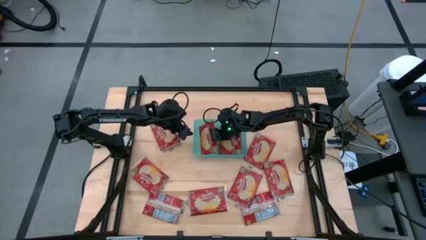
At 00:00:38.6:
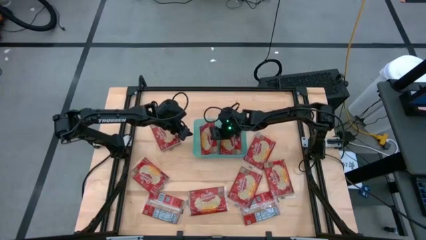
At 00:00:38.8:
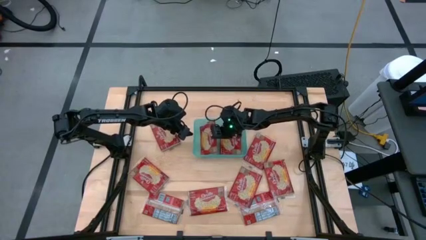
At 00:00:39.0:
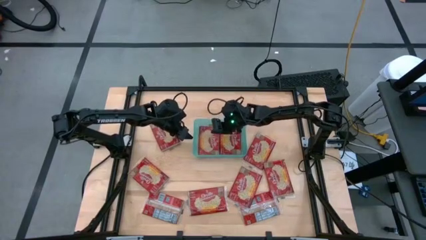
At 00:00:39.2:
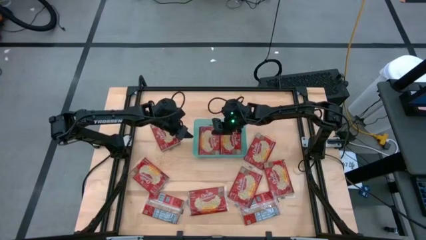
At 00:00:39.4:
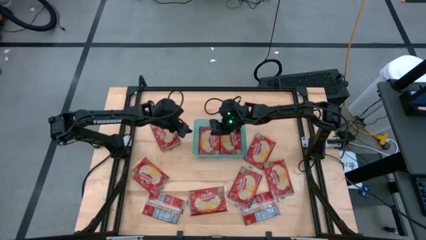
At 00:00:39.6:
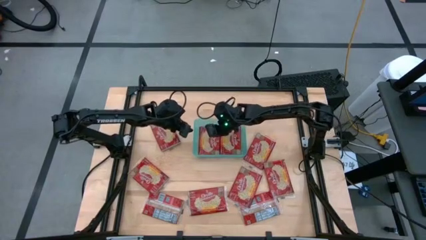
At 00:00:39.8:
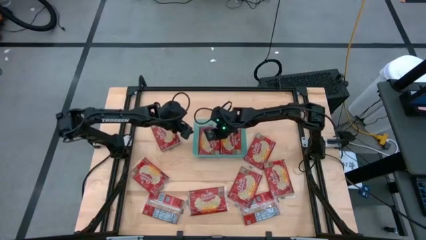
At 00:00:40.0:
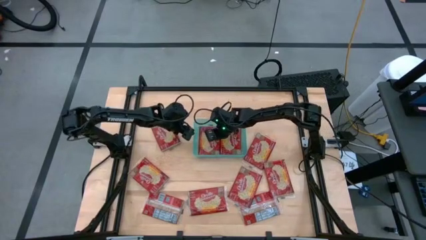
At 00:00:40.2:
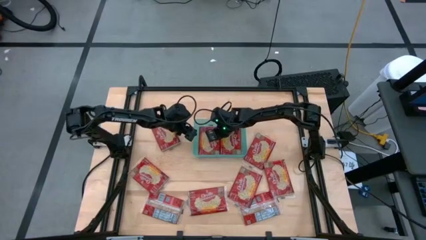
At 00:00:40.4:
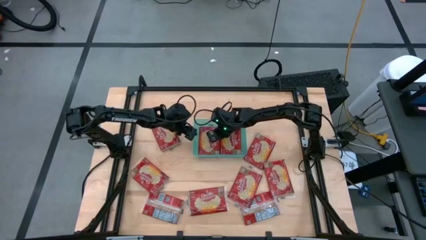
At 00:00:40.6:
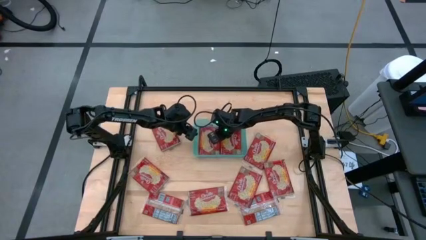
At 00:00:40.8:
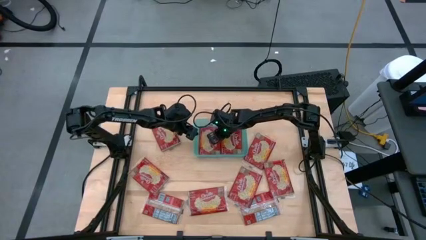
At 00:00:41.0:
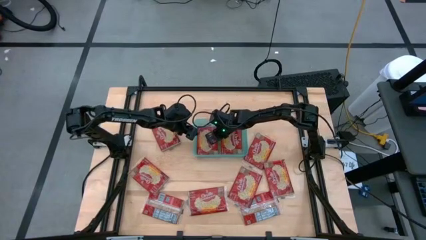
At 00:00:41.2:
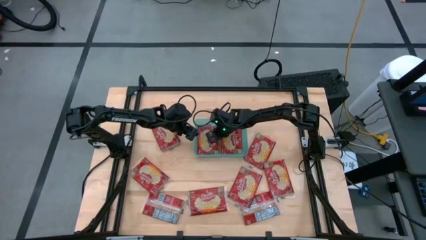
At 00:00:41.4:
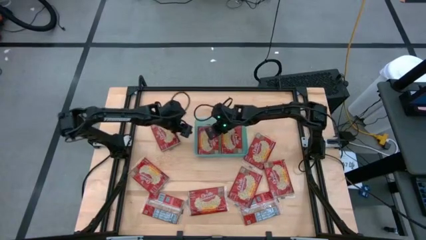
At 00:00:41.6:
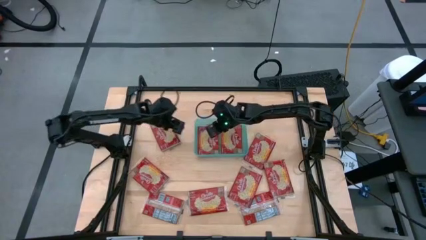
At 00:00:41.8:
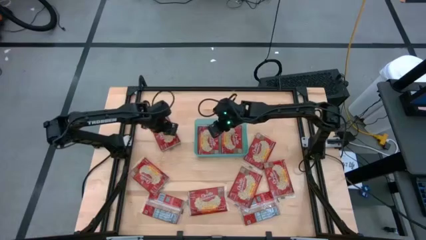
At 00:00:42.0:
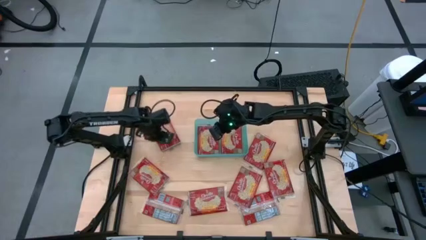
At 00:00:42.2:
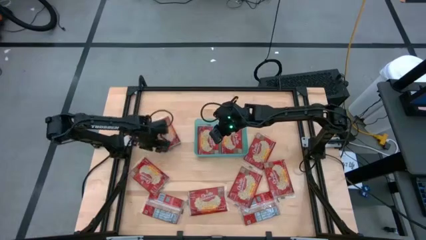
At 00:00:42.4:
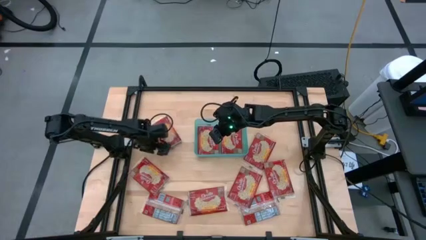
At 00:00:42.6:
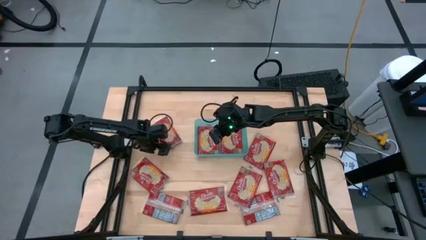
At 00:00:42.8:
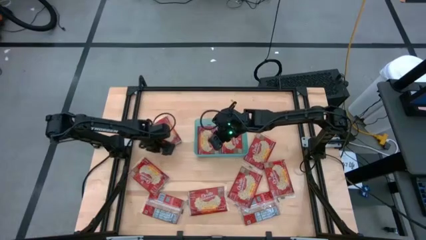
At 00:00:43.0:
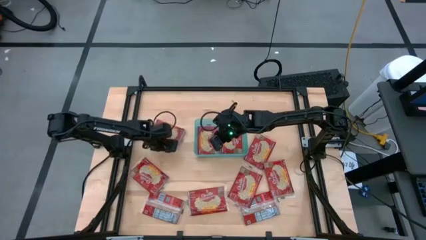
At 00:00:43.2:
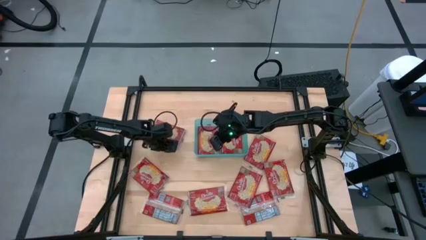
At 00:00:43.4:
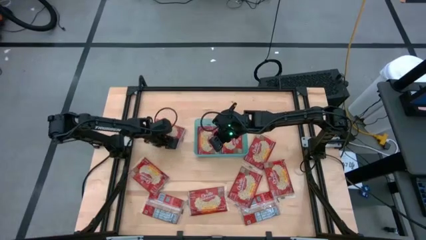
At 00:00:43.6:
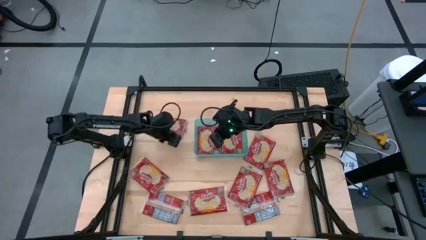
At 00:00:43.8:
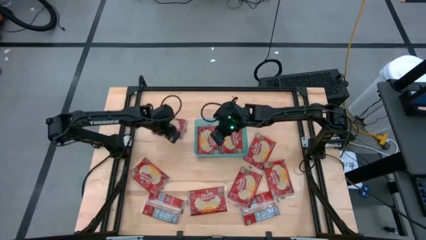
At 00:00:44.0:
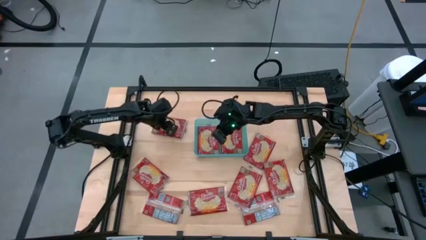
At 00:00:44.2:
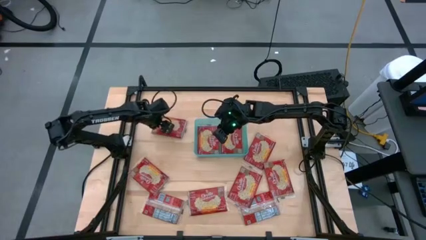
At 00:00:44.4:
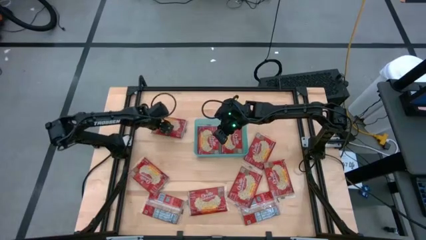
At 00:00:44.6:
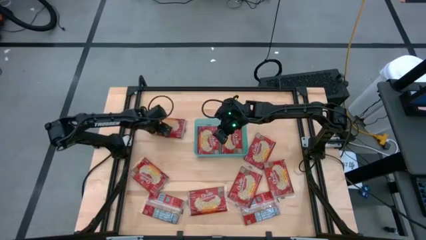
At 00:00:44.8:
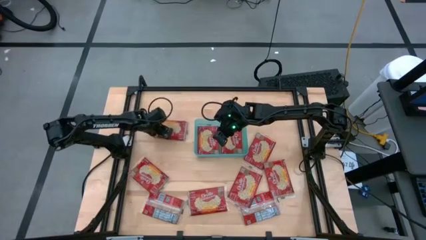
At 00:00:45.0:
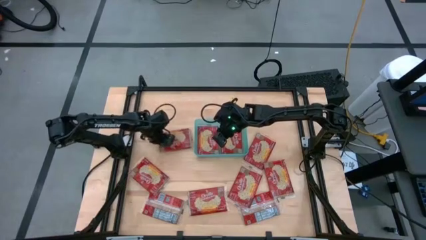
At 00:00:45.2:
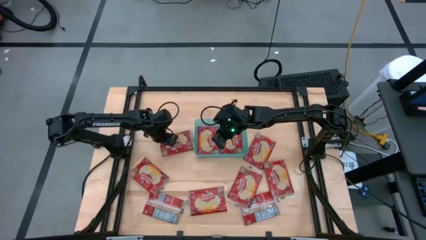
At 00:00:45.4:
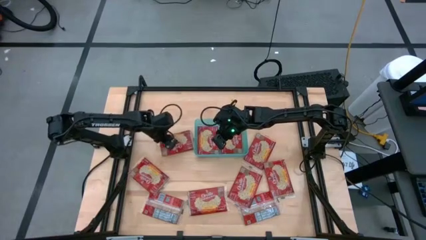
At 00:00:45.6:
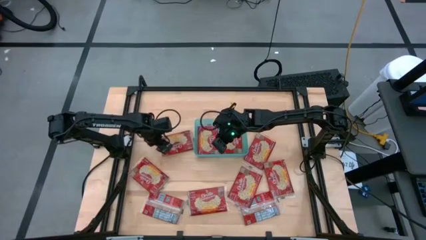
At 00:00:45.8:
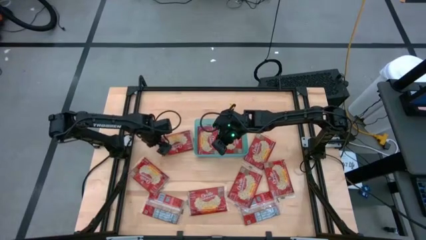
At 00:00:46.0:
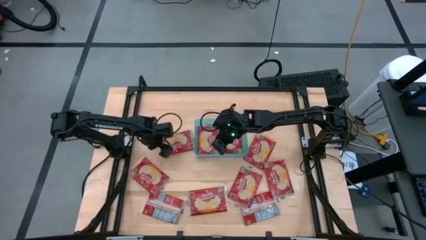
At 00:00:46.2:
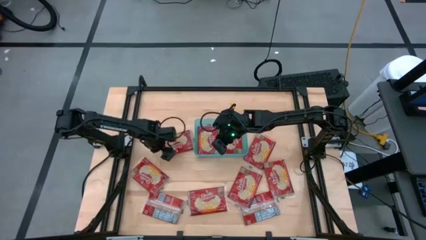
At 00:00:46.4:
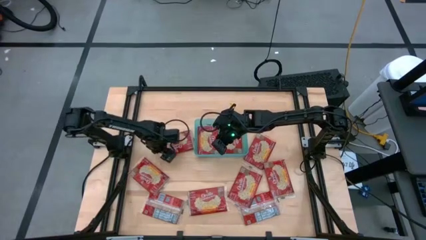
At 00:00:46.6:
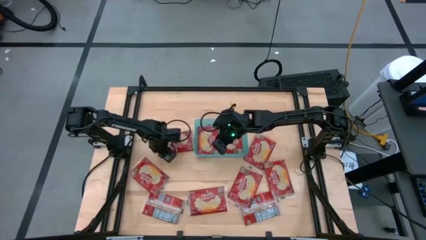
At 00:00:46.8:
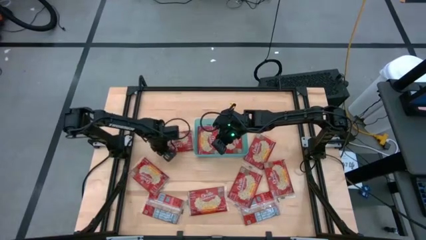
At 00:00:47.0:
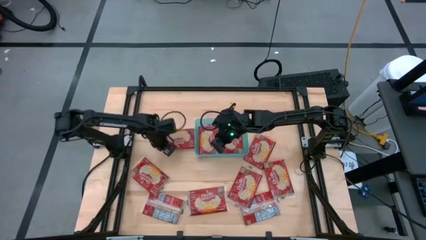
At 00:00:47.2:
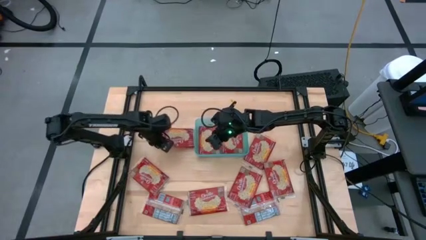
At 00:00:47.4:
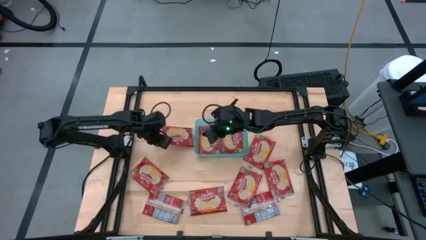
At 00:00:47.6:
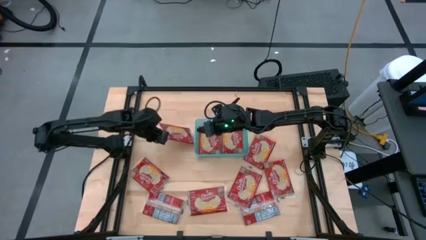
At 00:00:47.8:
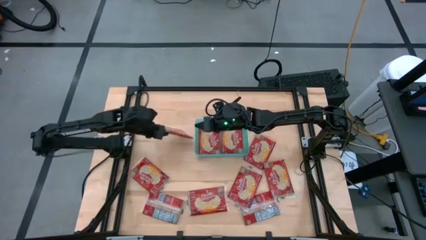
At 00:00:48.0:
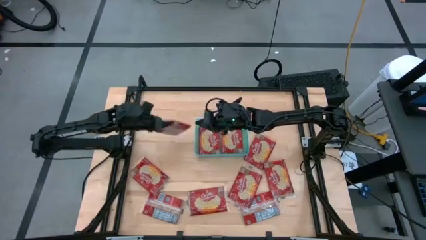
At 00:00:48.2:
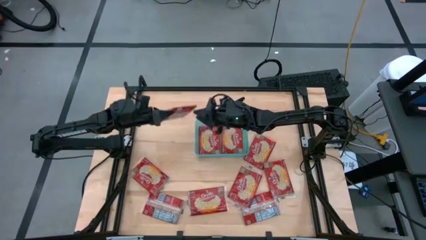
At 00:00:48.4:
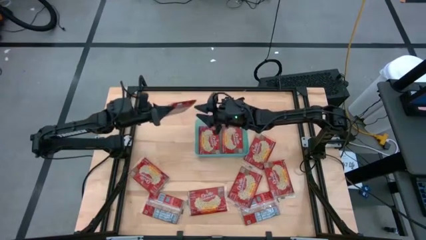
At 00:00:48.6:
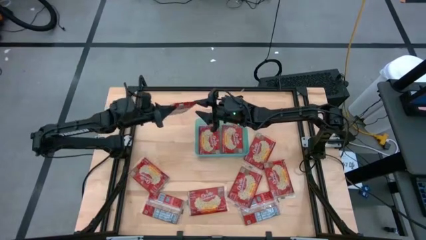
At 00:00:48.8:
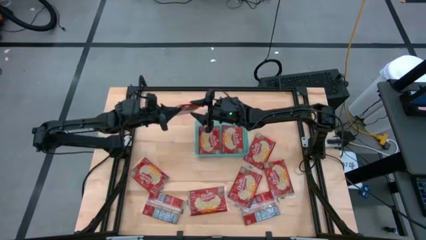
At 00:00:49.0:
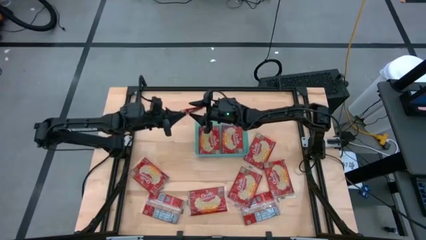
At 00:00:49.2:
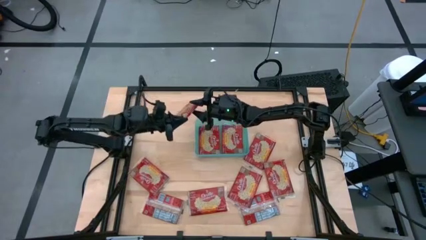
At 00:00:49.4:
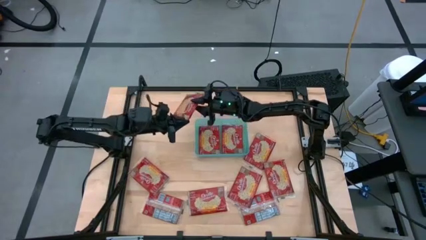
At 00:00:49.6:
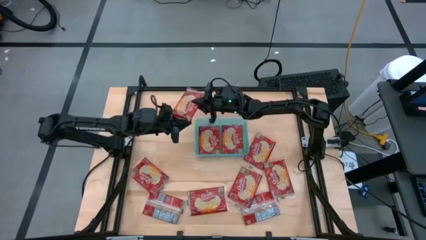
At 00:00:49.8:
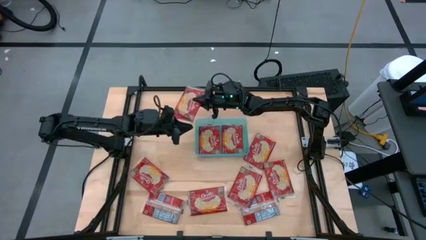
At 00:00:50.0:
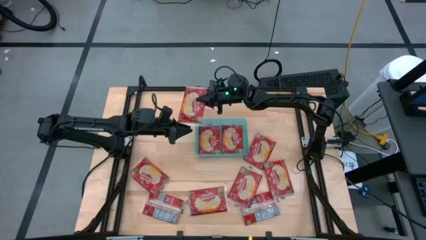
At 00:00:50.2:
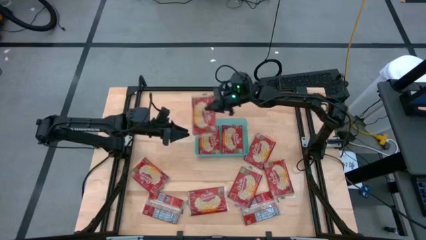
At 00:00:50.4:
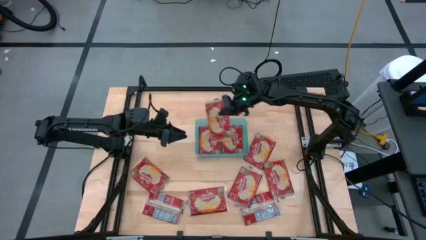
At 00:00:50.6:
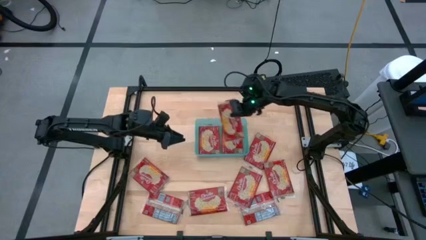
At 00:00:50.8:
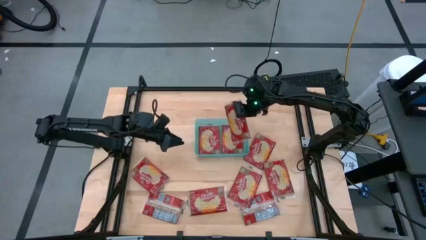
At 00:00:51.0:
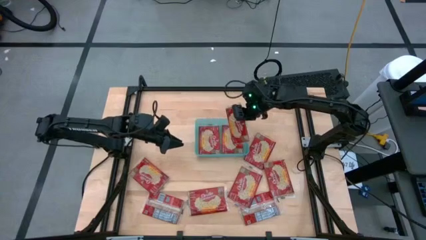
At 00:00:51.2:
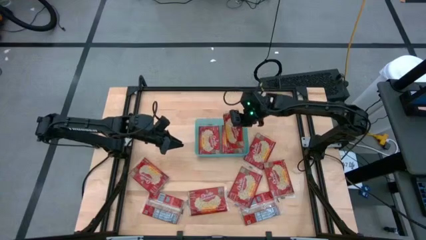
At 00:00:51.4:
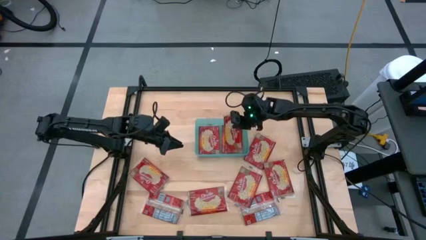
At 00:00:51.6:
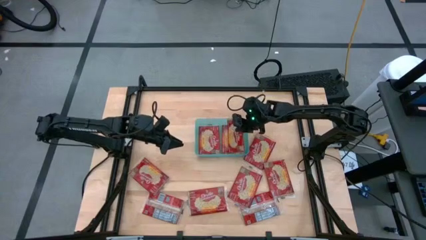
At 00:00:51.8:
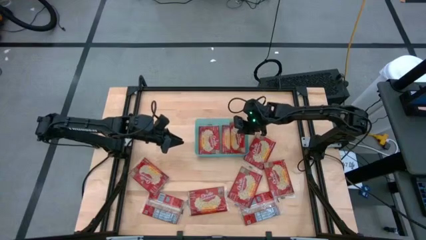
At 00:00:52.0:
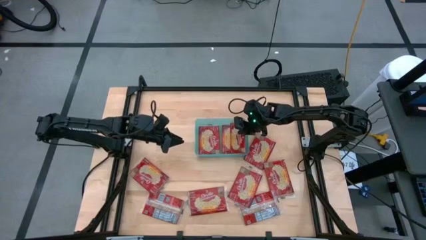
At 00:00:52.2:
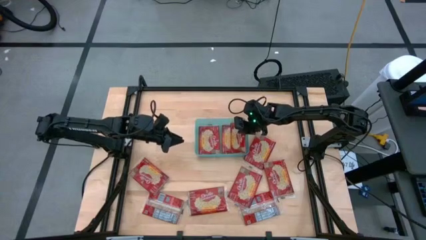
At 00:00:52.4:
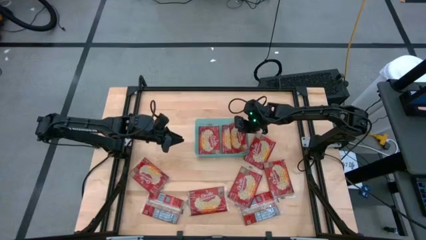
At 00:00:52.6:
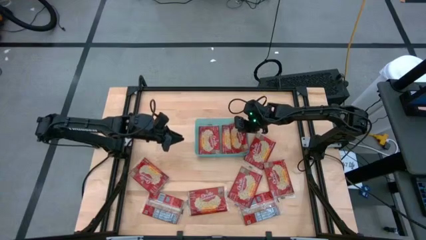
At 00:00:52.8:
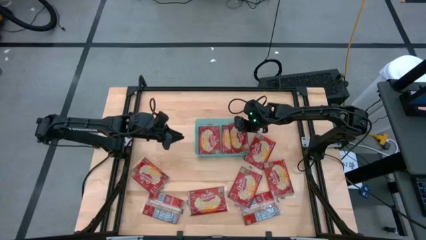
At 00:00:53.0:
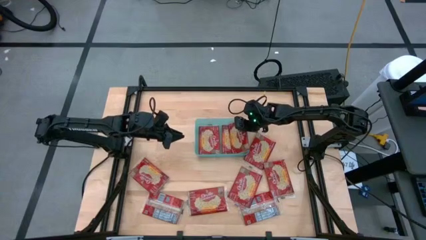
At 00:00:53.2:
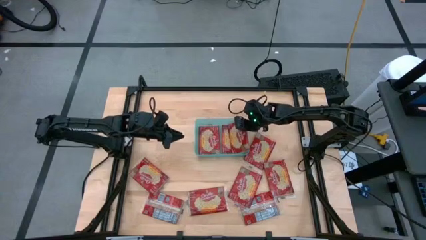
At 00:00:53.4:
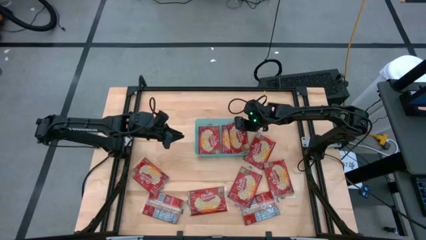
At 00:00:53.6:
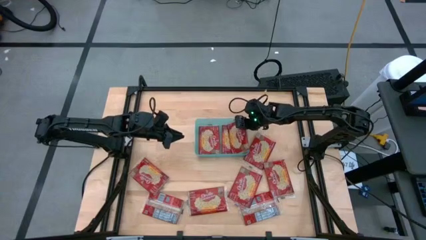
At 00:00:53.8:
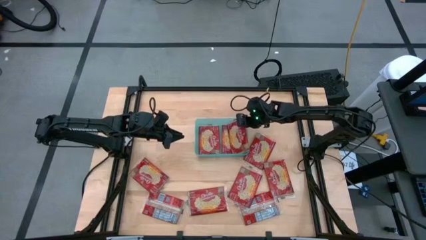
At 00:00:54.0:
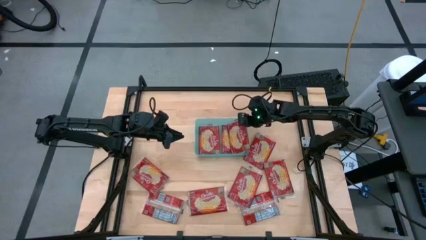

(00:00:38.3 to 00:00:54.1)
Task: Sort popcorn bags into baskets
Put the red popcorn bag into the green bin
